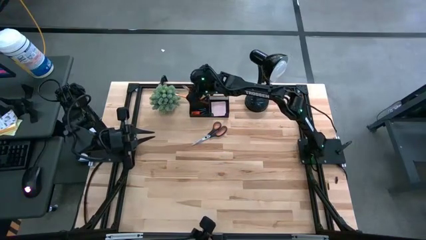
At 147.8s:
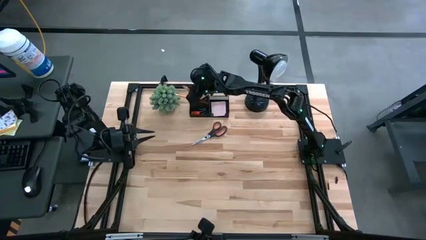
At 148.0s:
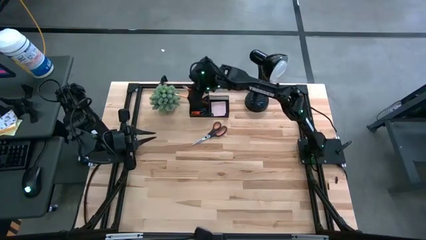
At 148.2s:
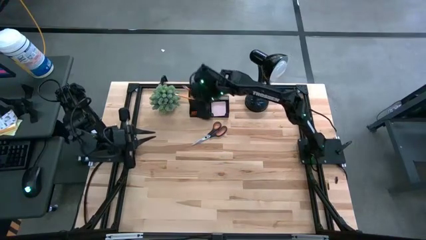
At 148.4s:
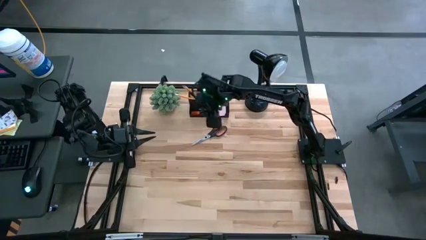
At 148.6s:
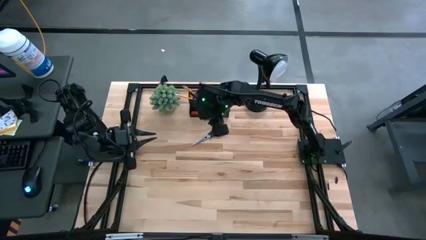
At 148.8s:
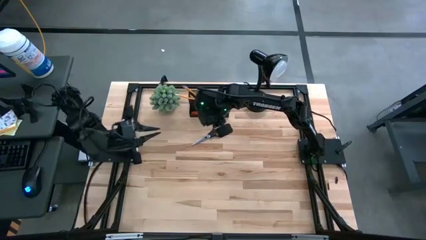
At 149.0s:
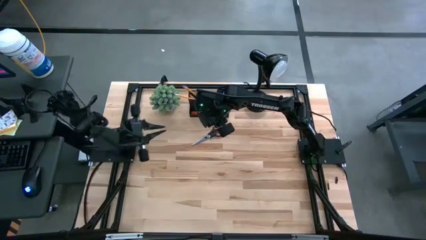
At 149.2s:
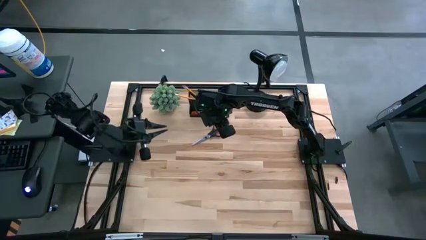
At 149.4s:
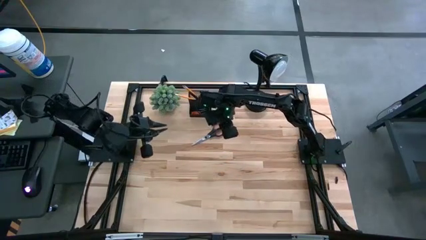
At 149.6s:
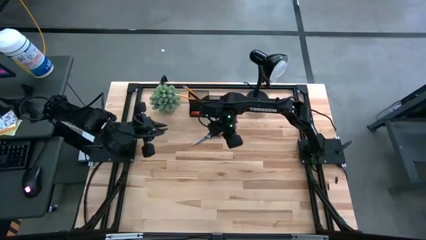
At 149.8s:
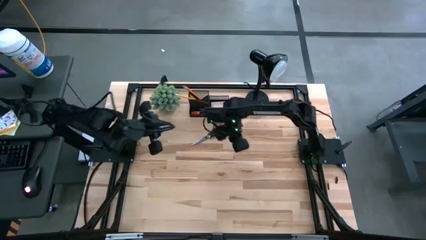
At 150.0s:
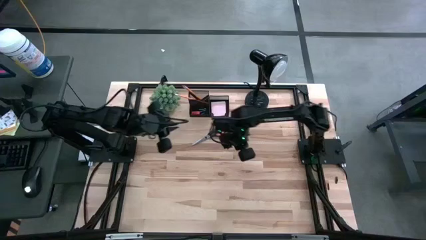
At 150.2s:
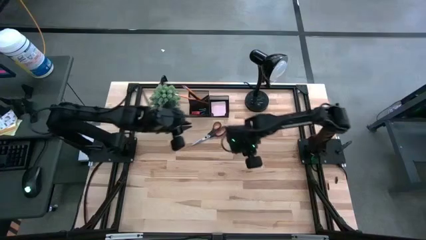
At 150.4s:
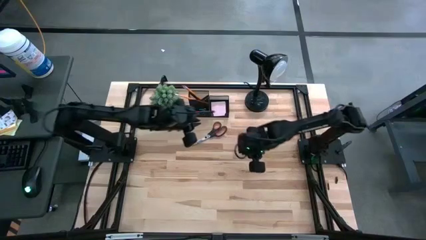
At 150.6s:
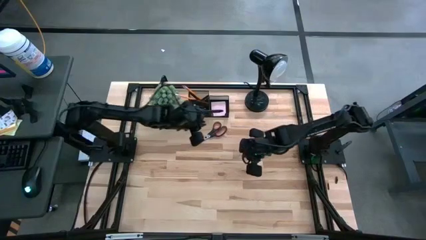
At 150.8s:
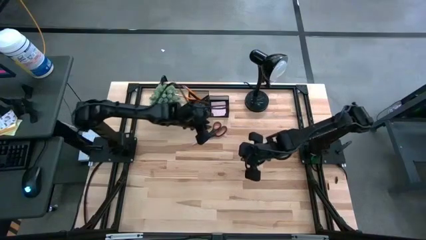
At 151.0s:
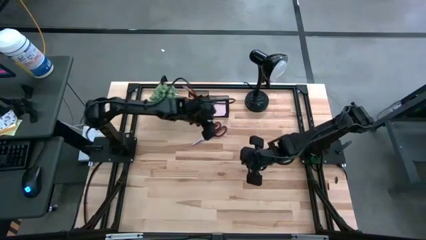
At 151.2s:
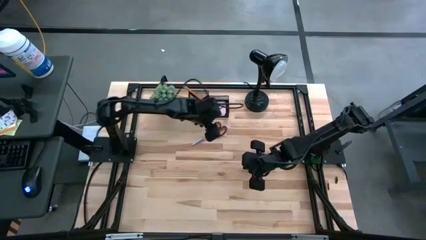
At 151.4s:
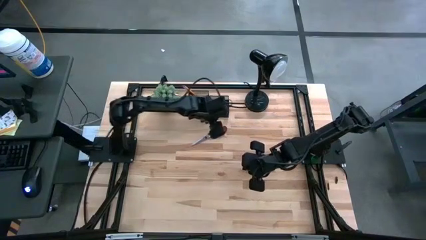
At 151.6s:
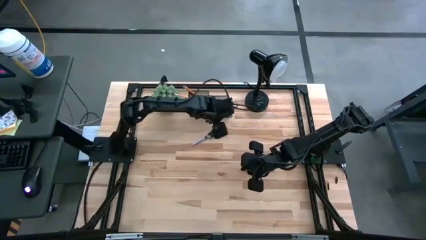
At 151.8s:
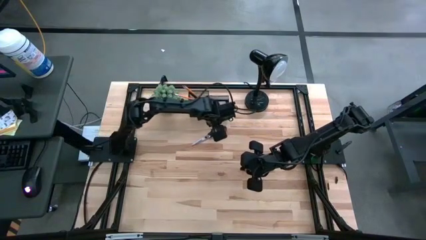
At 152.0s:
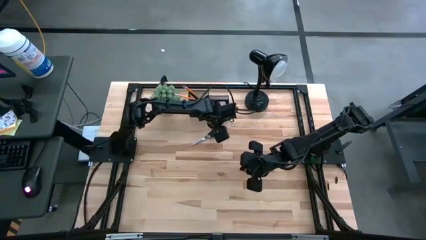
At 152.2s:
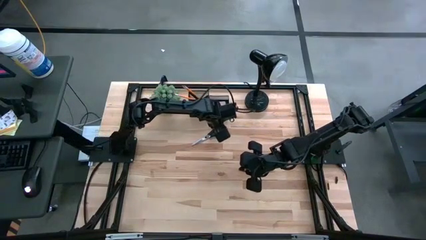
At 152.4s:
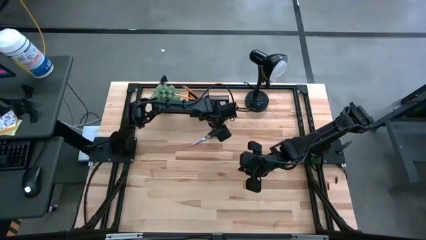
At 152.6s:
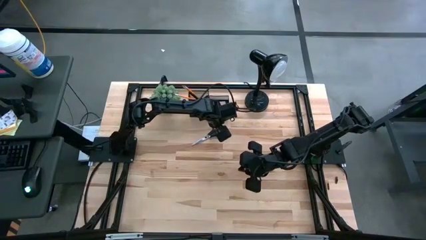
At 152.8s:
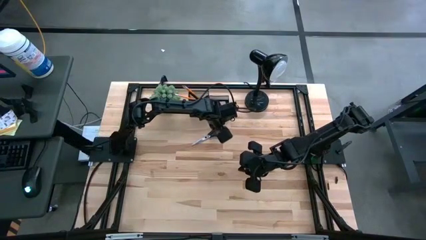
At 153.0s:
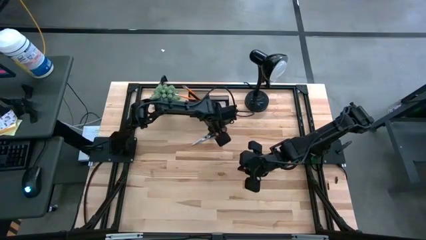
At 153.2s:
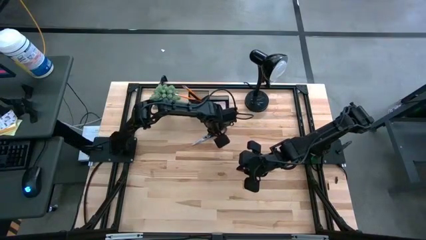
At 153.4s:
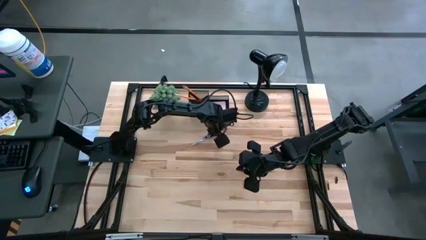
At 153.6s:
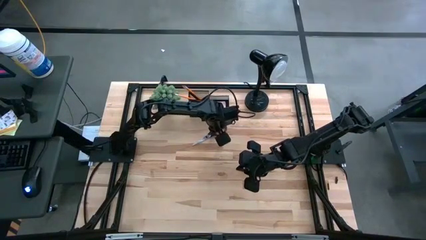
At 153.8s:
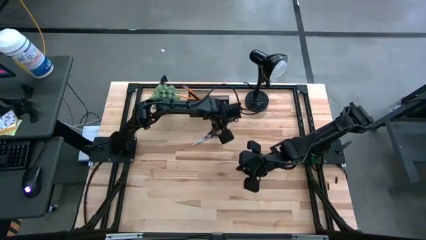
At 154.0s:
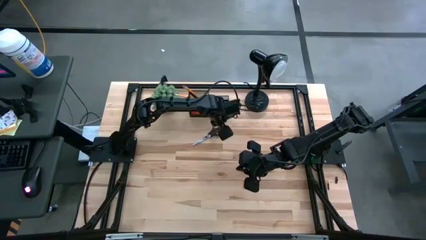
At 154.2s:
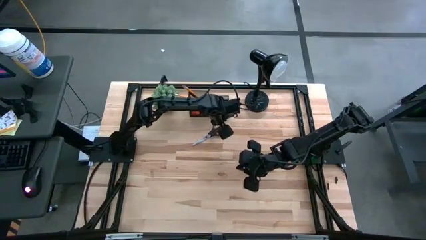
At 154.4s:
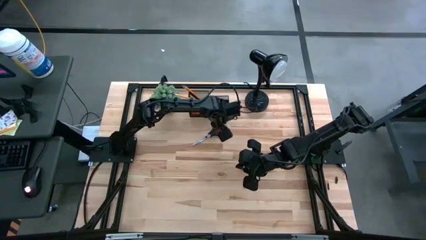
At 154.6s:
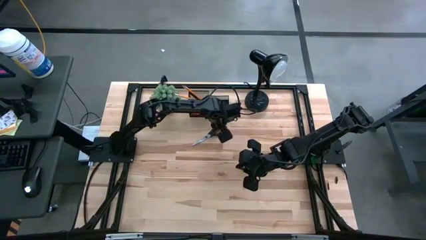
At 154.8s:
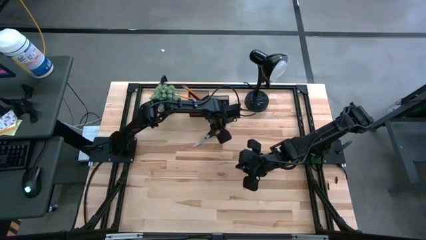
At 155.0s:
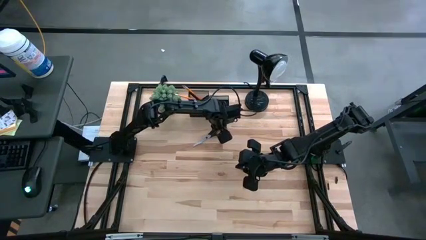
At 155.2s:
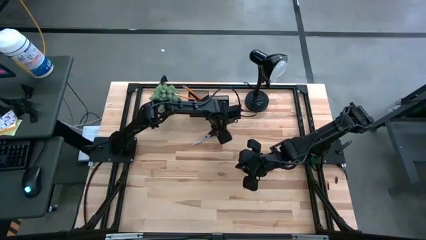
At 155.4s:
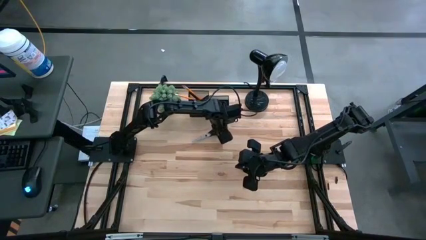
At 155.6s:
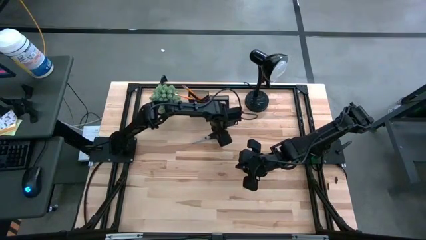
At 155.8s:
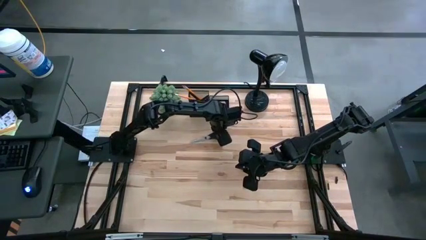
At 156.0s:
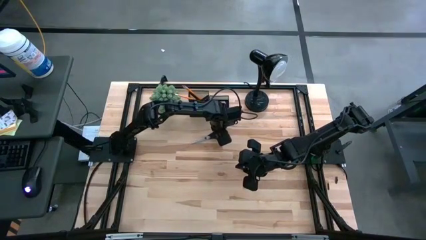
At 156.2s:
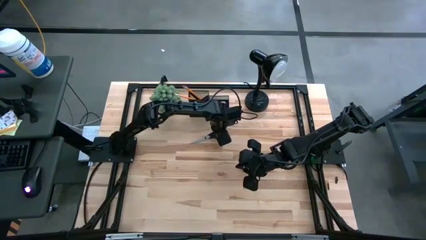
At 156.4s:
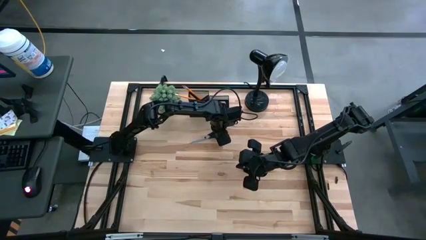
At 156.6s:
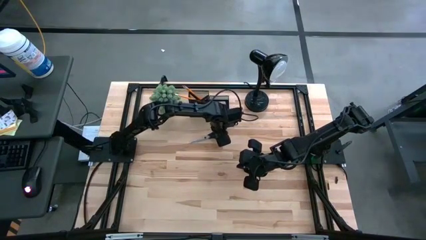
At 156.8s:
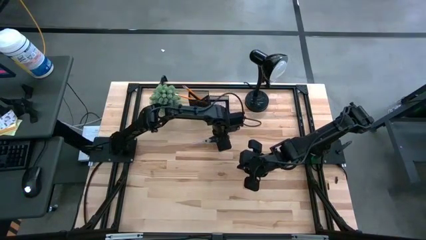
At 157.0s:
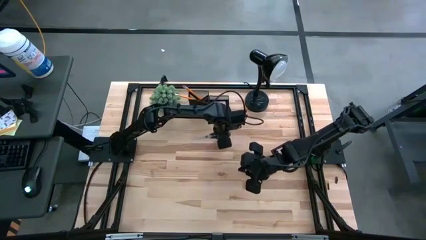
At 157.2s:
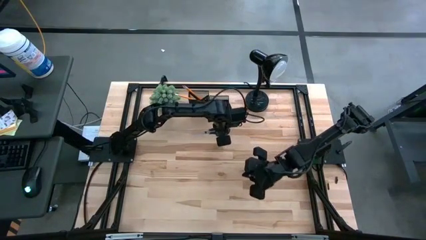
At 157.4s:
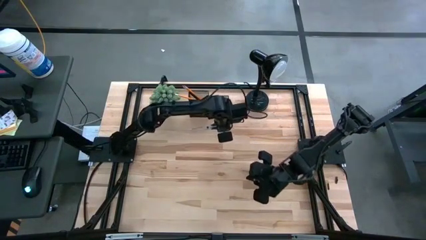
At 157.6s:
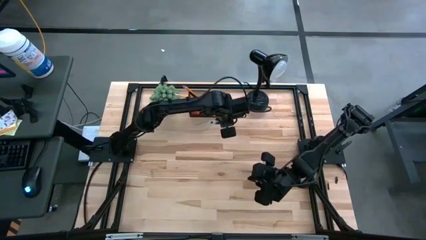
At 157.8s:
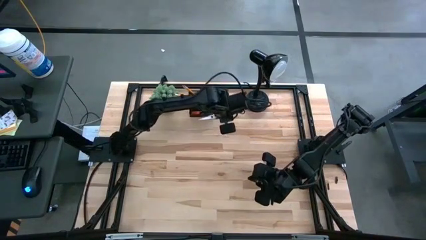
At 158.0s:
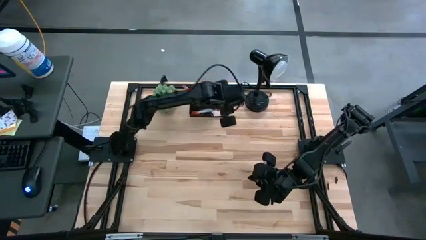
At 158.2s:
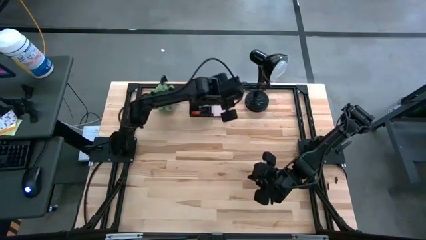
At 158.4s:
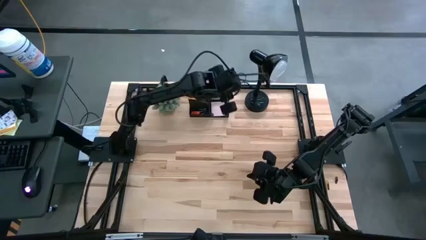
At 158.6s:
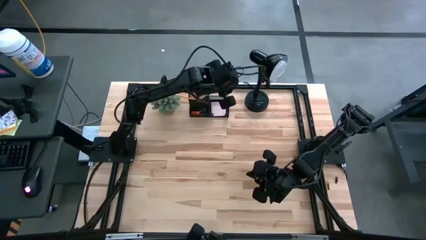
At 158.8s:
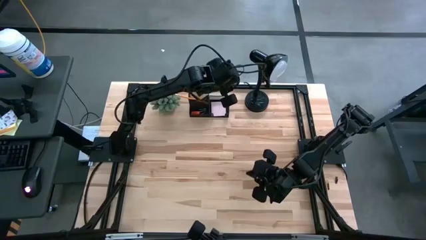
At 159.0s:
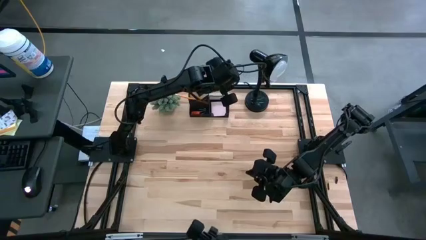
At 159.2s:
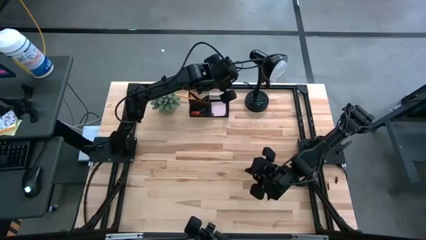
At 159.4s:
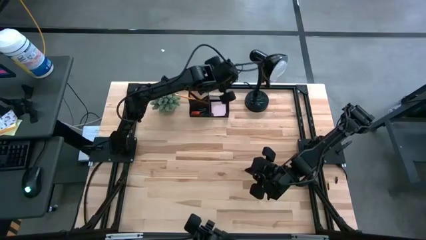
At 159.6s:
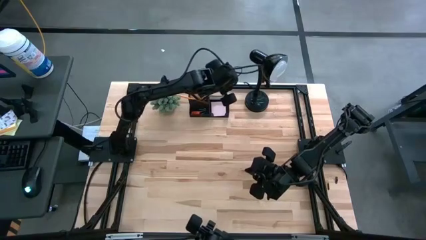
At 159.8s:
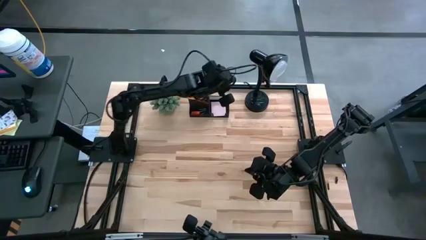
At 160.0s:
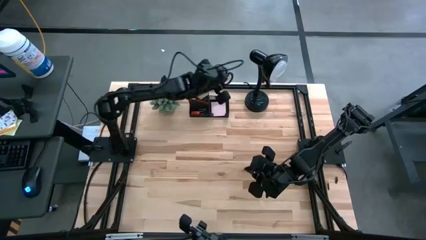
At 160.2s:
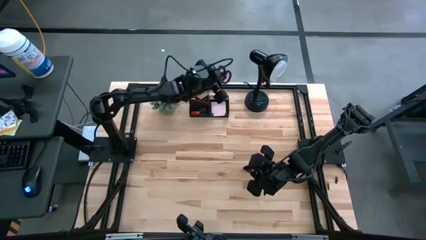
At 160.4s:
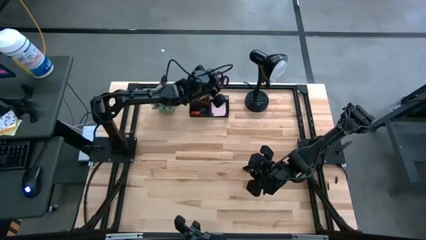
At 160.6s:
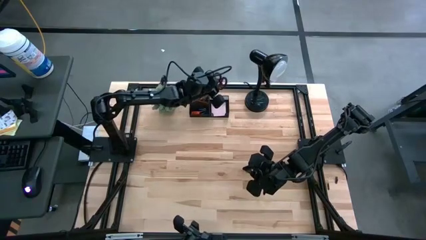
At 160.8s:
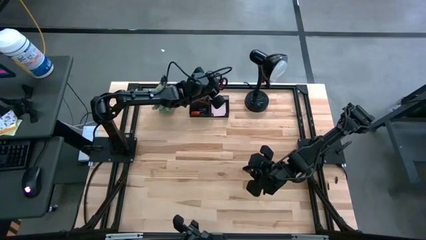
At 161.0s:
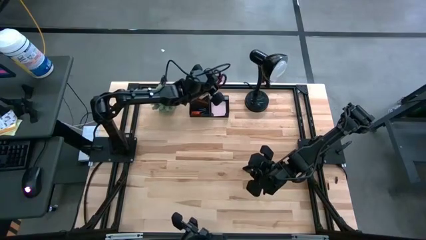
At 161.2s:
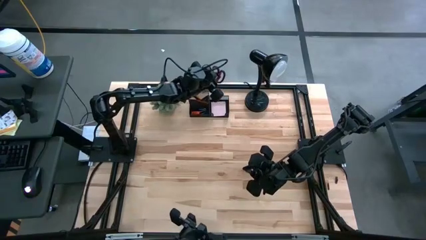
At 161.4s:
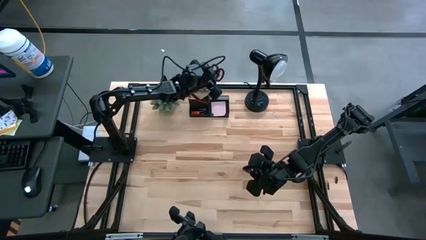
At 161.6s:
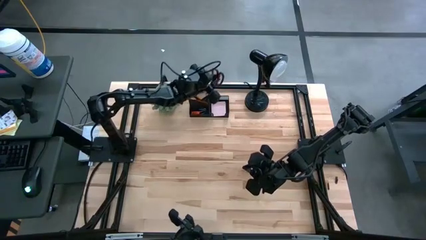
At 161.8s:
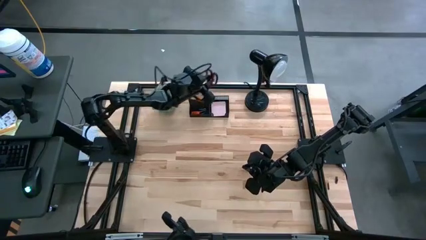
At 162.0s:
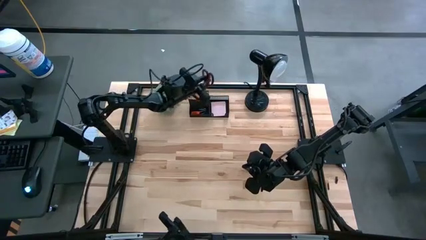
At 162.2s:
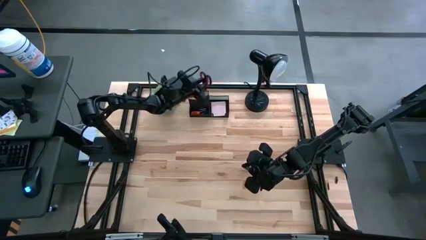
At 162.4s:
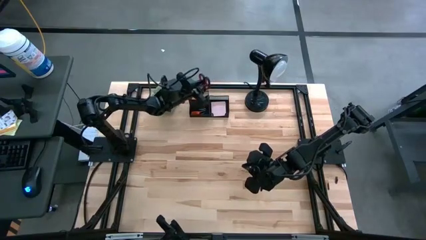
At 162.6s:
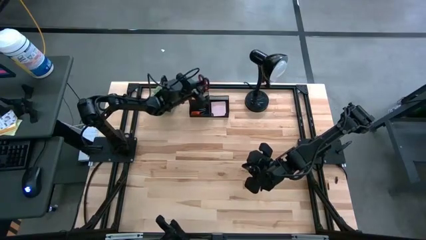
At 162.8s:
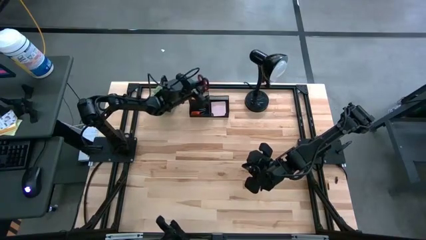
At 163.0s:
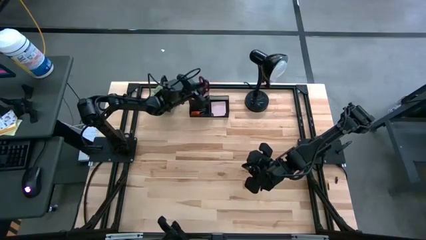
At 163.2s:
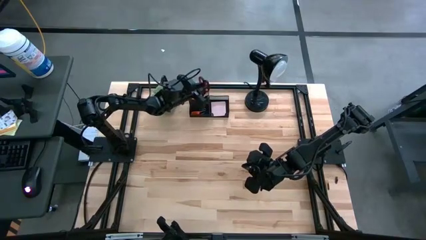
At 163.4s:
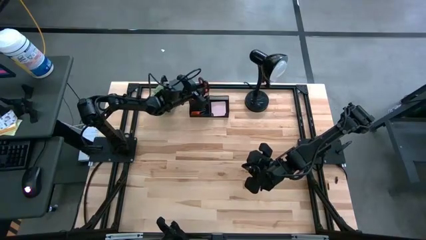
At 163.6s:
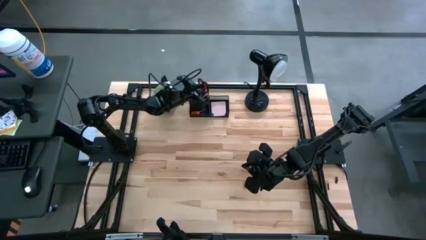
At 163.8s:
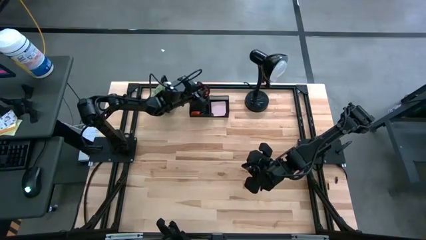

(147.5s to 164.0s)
Task: Pick and place office supplies into organizer
Put the black scissor into the black desk organizer

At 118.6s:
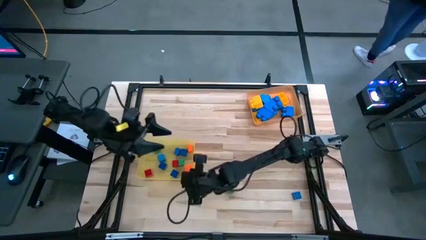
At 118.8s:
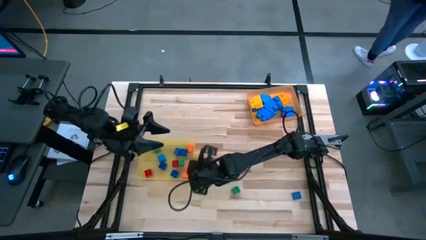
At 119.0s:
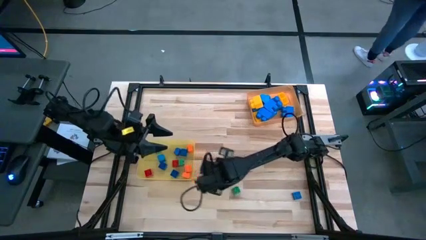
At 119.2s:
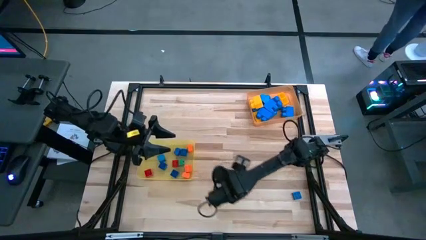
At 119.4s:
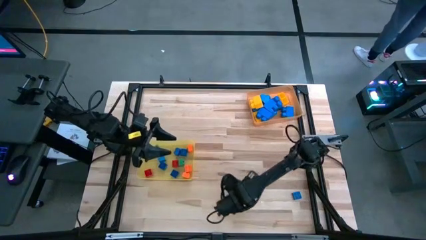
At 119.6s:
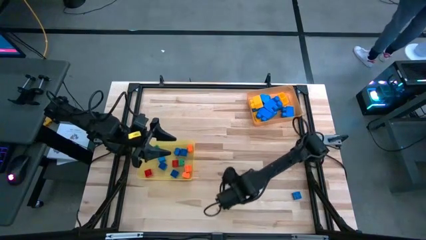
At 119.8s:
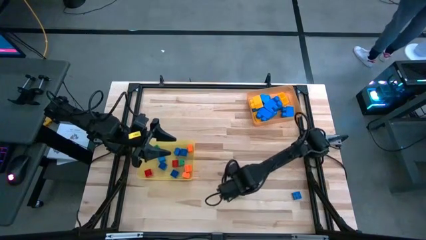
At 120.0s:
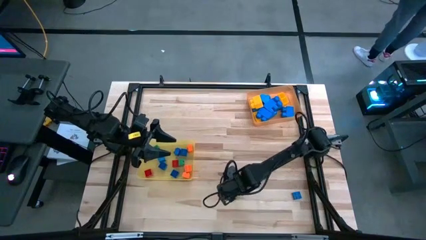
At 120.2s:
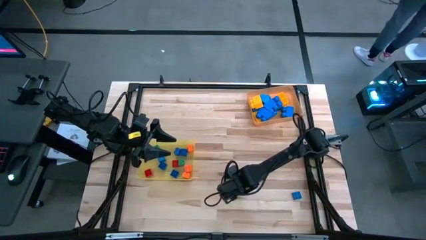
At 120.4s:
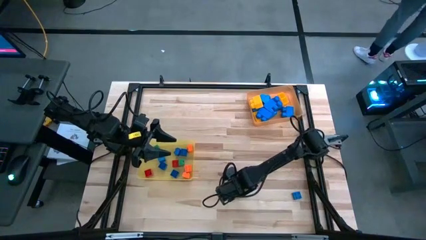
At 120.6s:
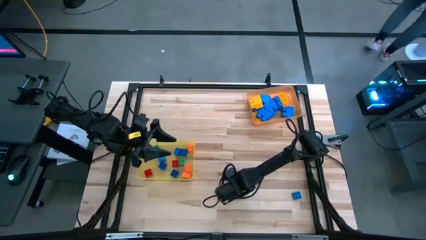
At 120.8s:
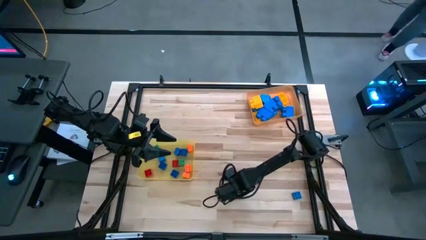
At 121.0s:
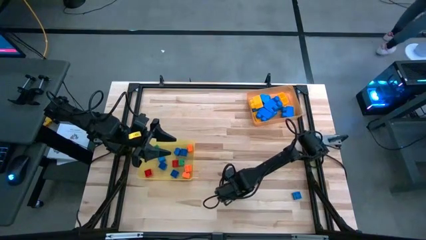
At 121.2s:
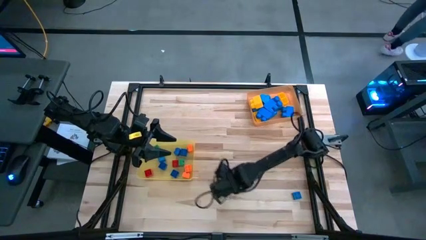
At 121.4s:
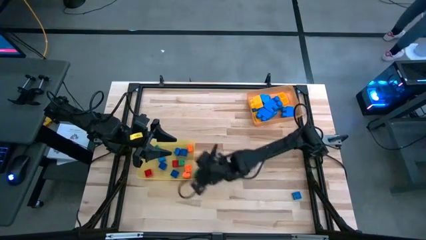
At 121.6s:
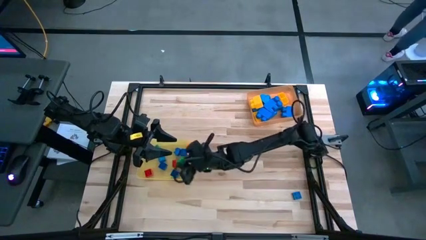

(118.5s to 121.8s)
Task: Sort blocks by size
Put the small green 4 stud game piece into the yellow bin
